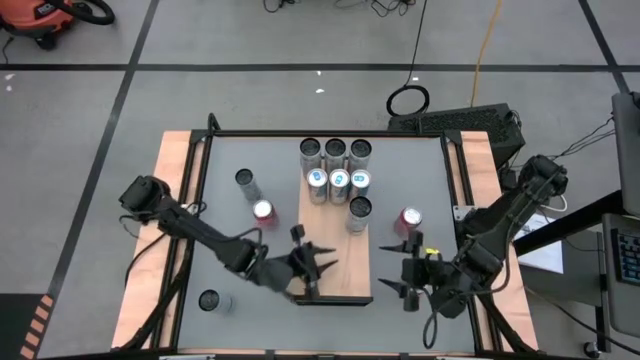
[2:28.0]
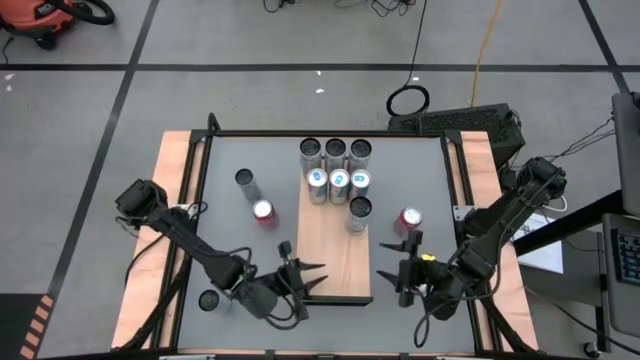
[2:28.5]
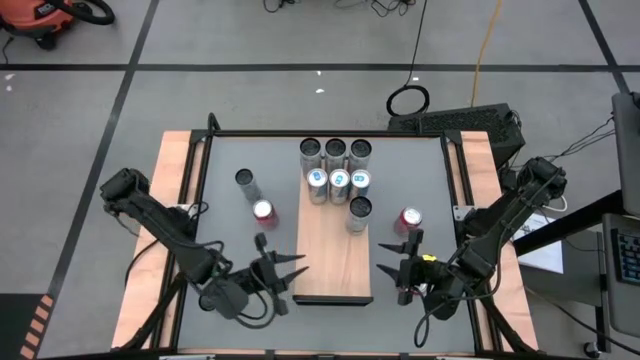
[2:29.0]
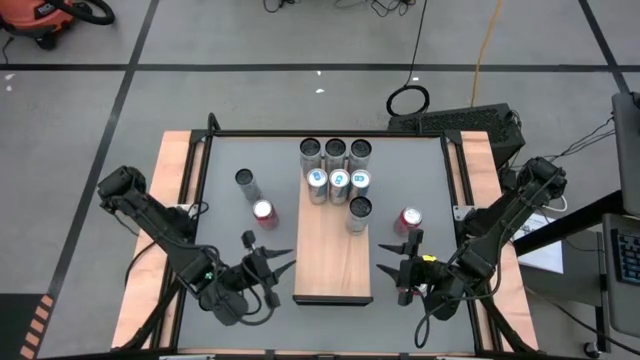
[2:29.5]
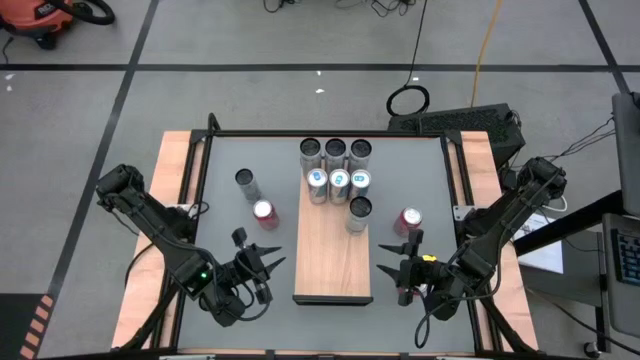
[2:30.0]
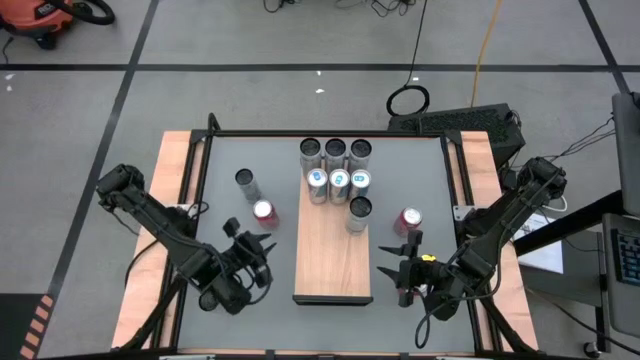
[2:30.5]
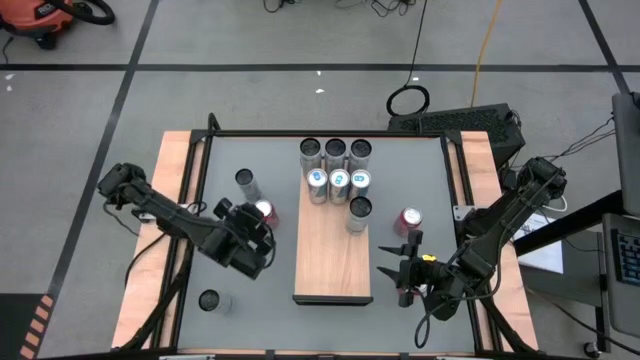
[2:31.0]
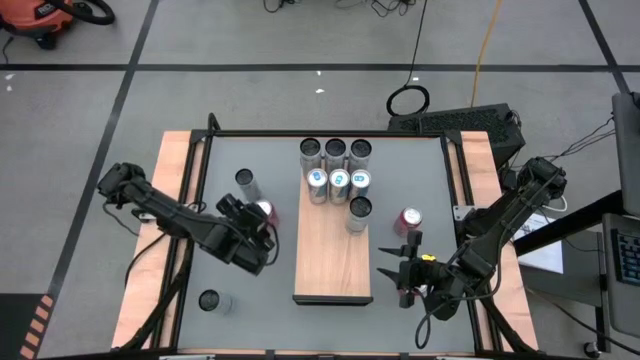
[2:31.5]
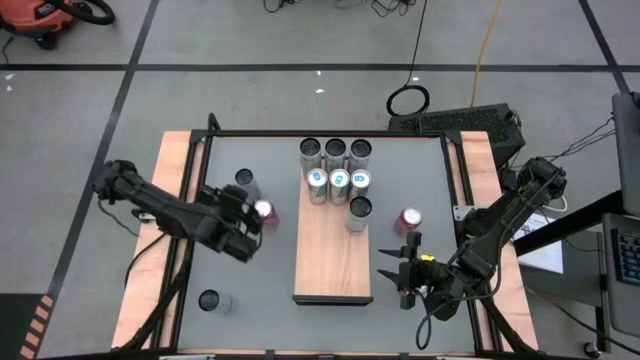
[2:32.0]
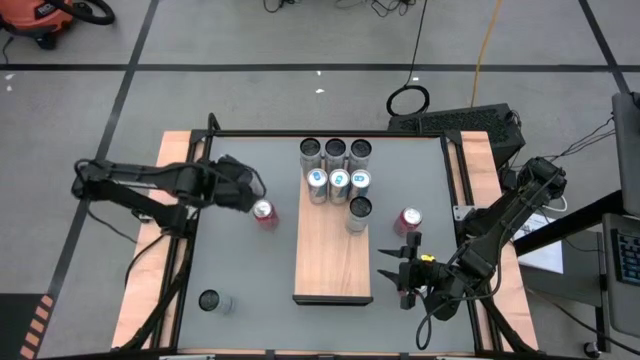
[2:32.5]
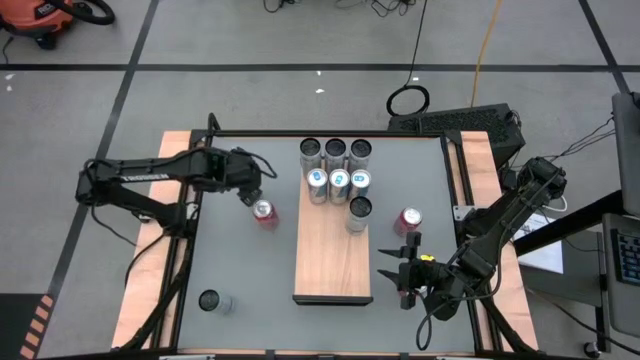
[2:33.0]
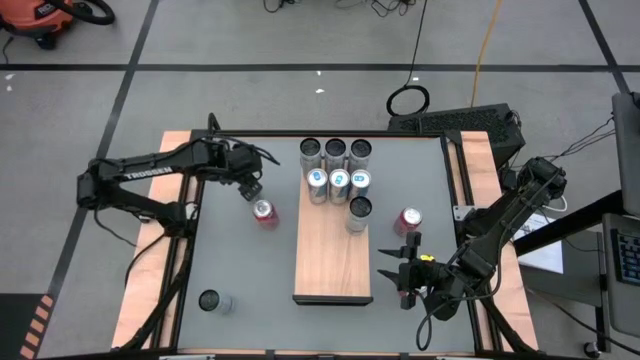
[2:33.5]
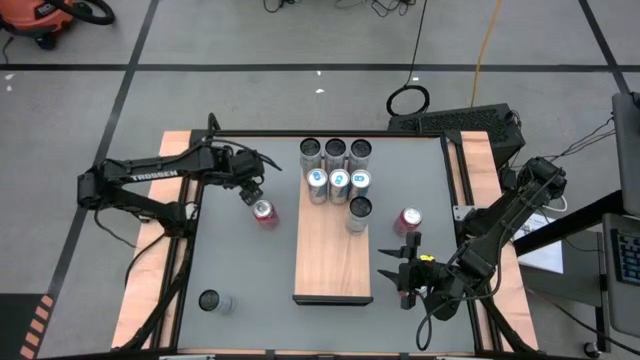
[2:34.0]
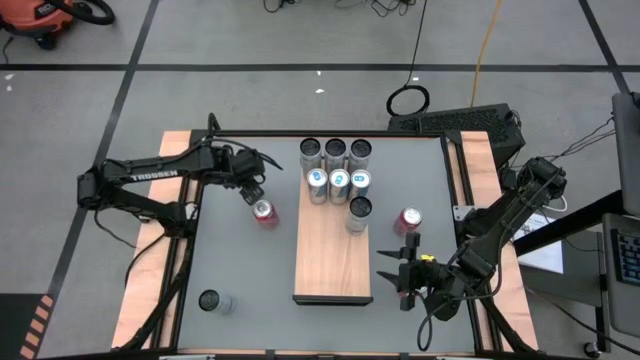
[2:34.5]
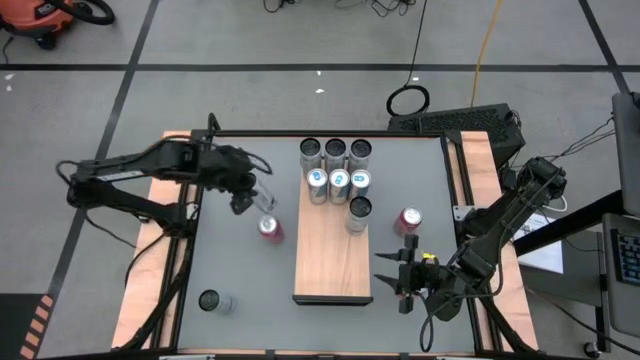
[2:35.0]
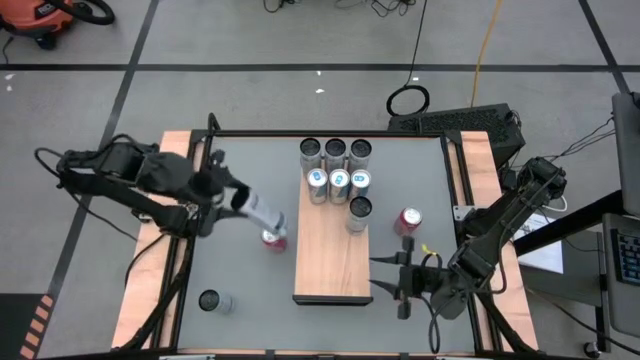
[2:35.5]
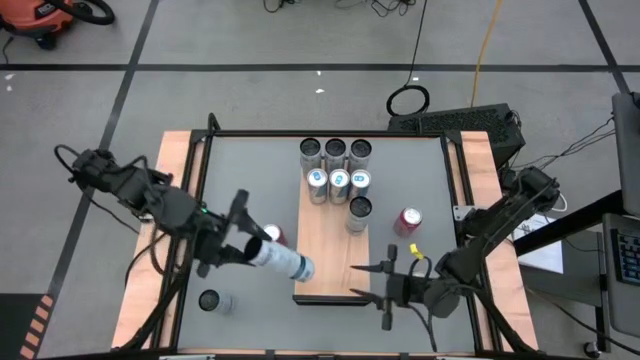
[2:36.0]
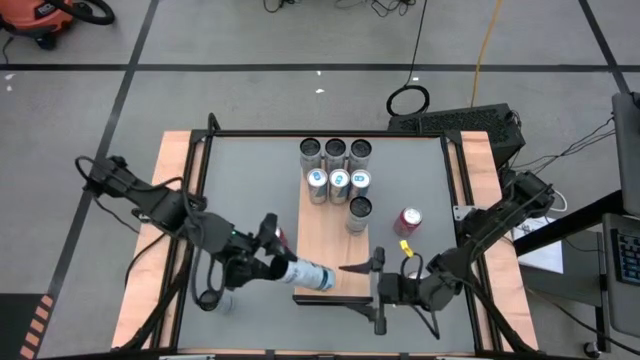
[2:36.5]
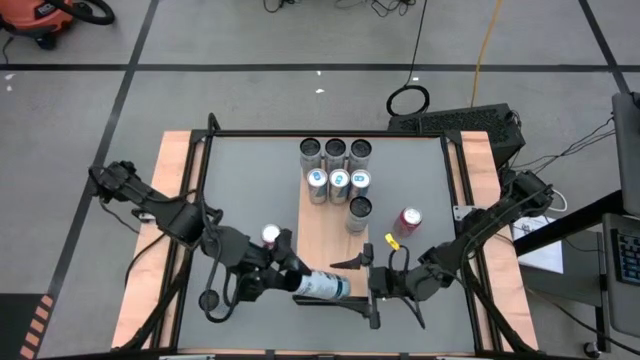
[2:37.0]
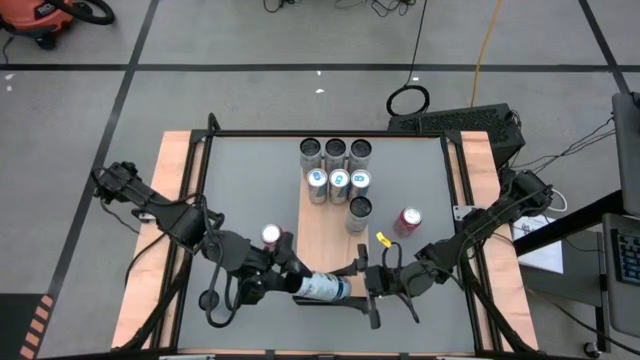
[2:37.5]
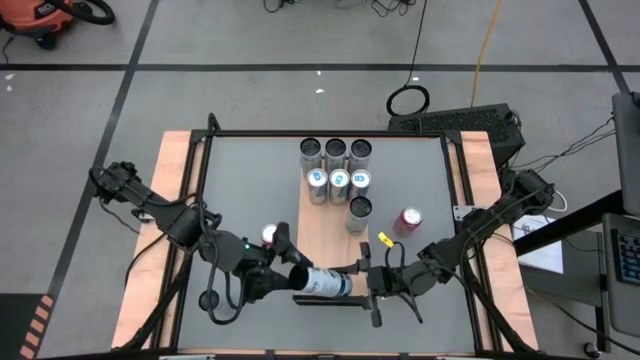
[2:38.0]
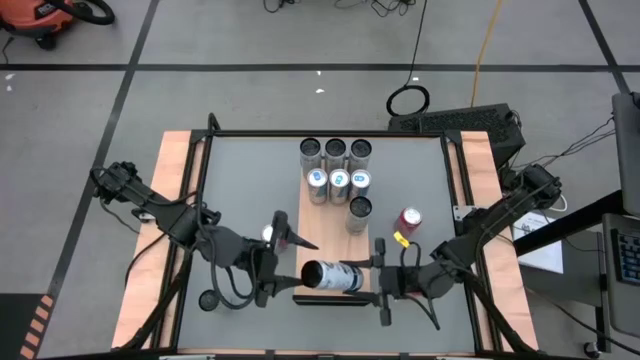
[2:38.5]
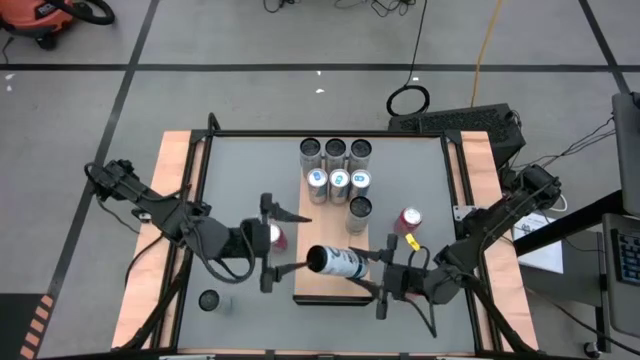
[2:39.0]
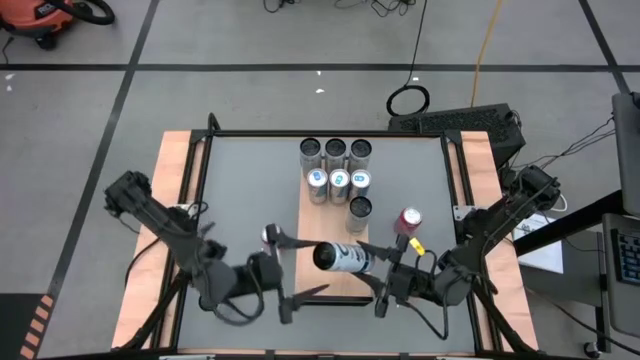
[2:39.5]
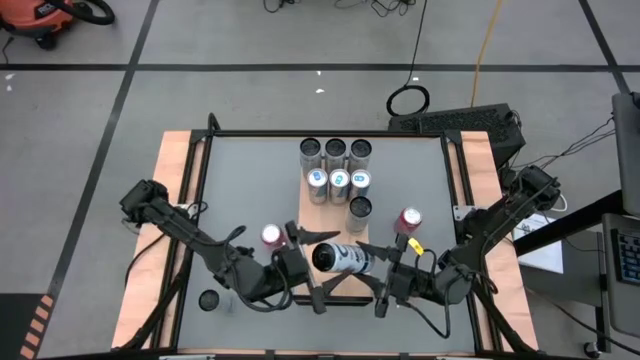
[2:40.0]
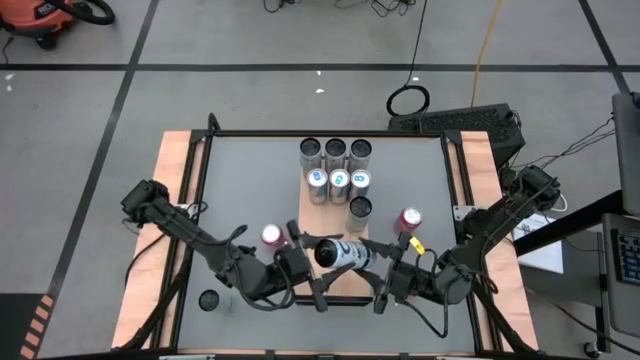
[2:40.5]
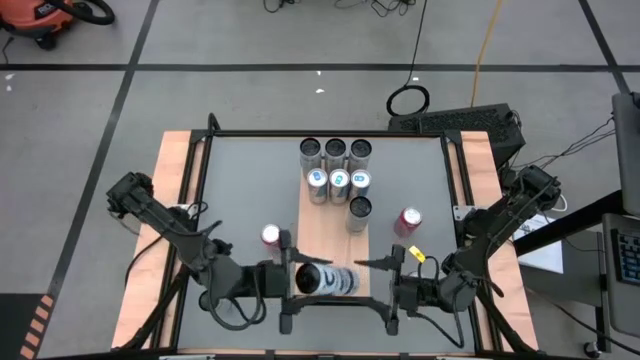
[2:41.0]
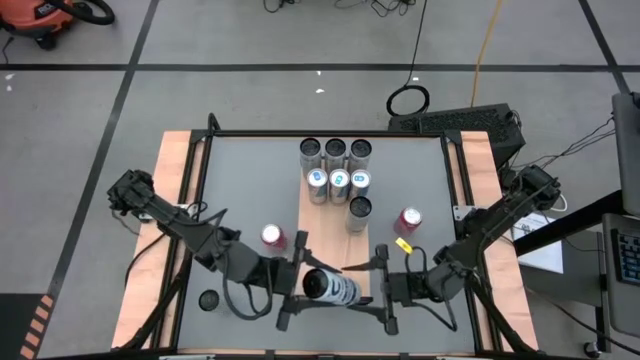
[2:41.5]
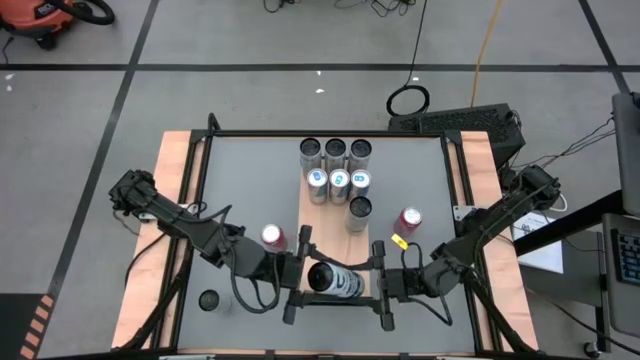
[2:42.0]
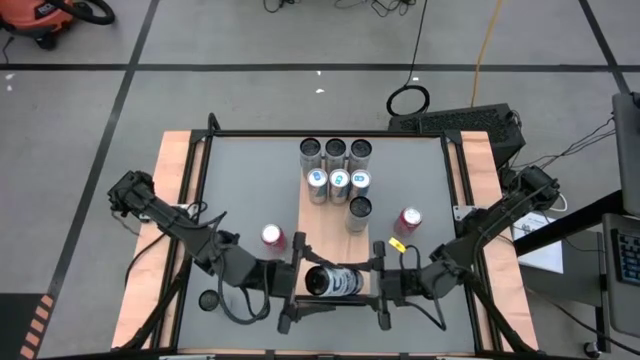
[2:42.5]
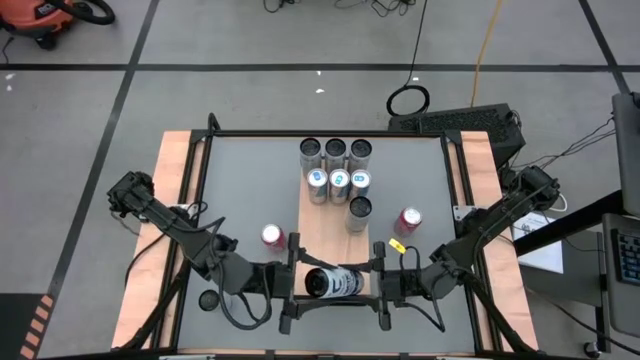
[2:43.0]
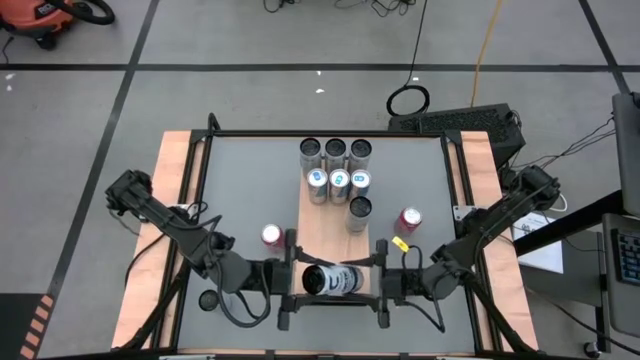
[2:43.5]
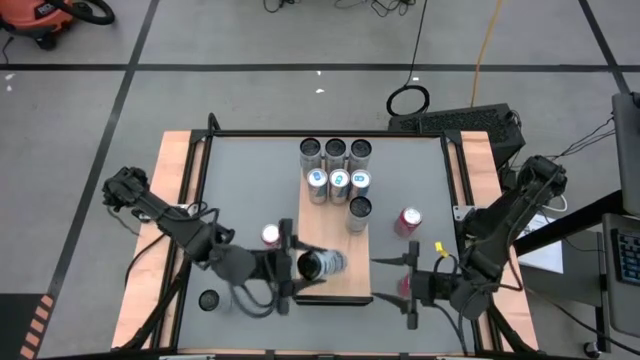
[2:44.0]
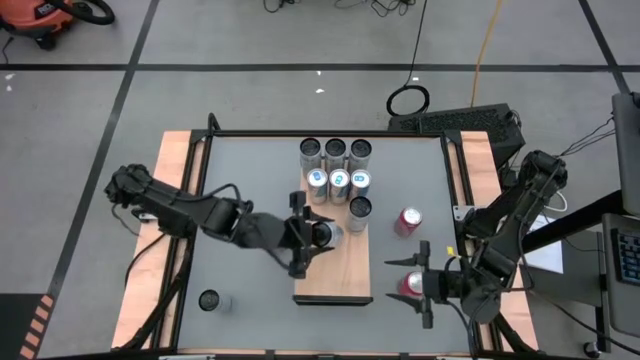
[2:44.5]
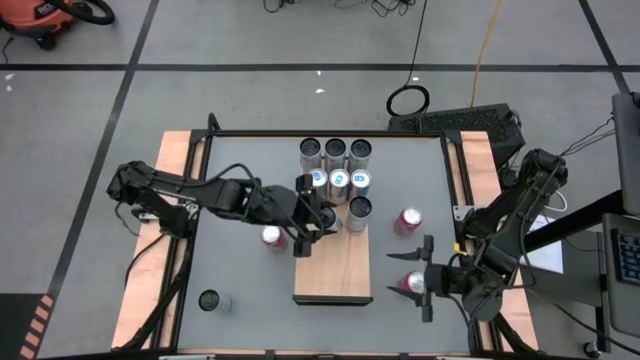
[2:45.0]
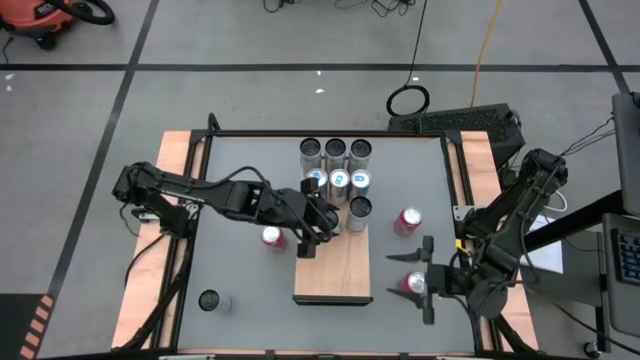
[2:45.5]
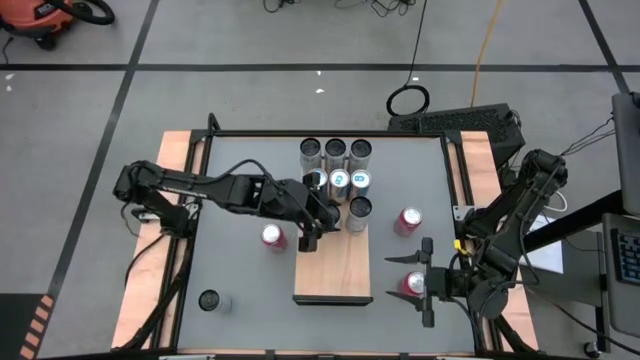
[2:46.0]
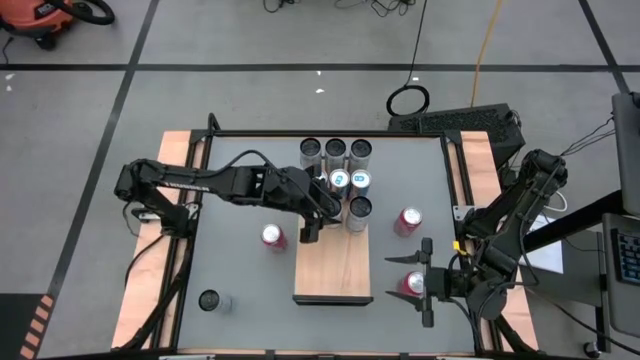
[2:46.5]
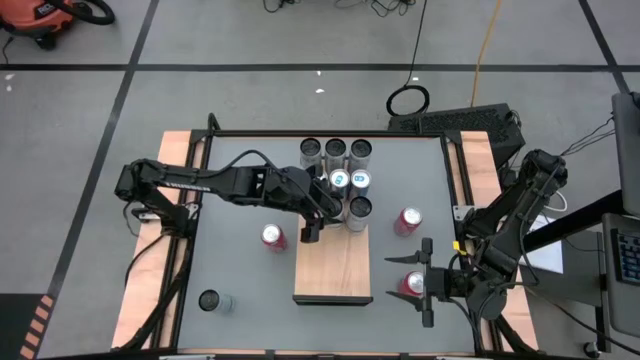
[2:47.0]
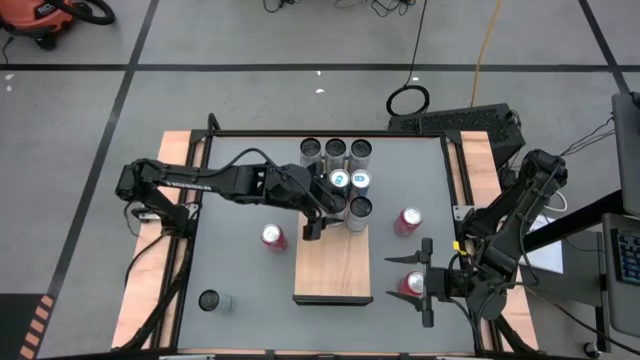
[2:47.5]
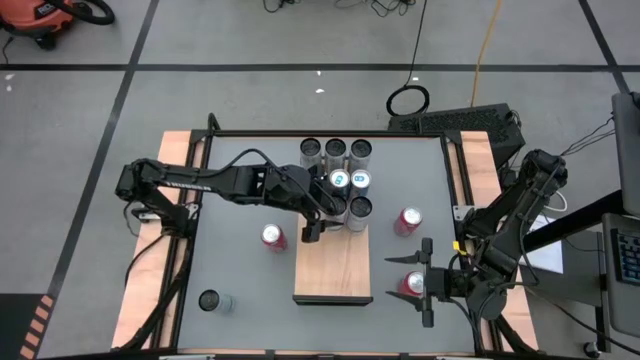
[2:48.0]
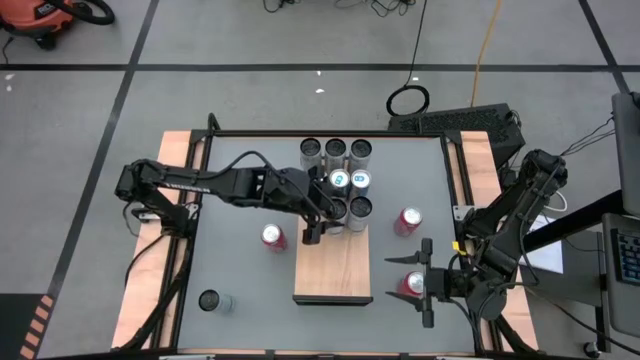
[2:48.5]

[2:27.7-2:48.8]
Task: Place canned beverage on shelf
Put the top white blue soda can on the shelf aligned with the other white blue soda can

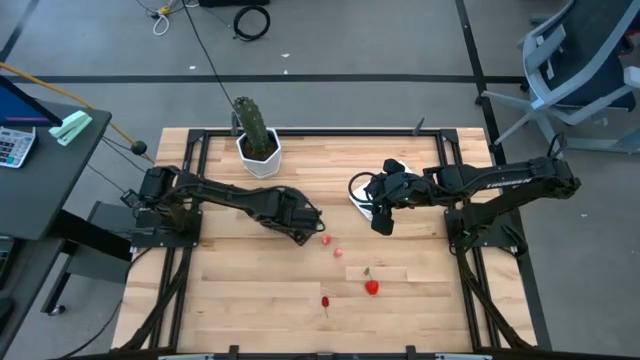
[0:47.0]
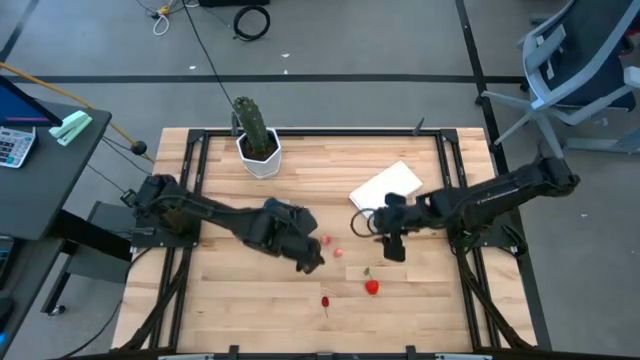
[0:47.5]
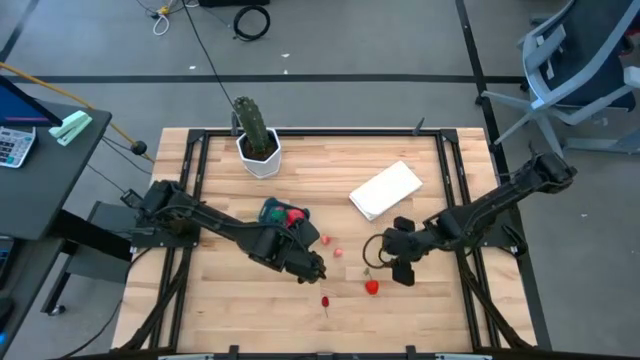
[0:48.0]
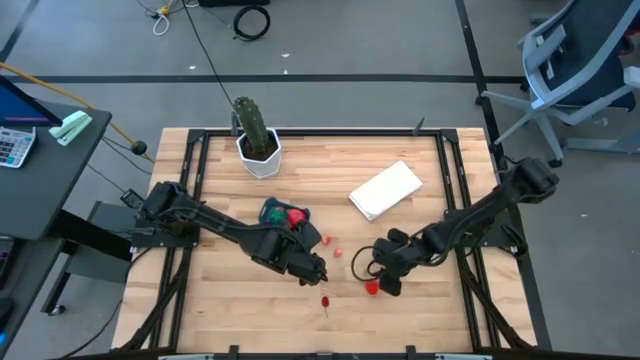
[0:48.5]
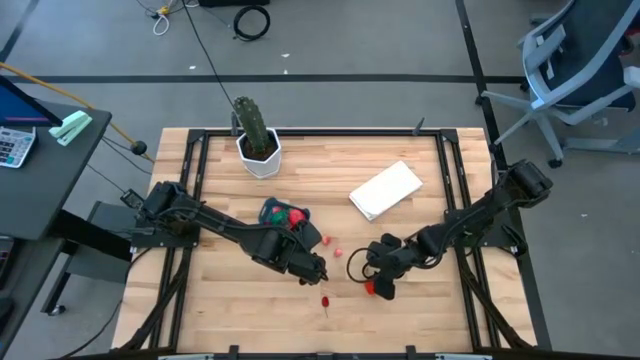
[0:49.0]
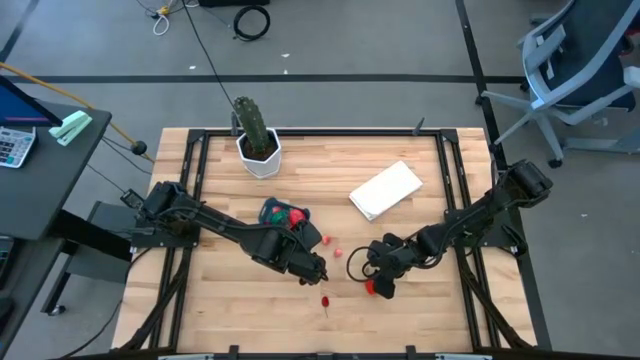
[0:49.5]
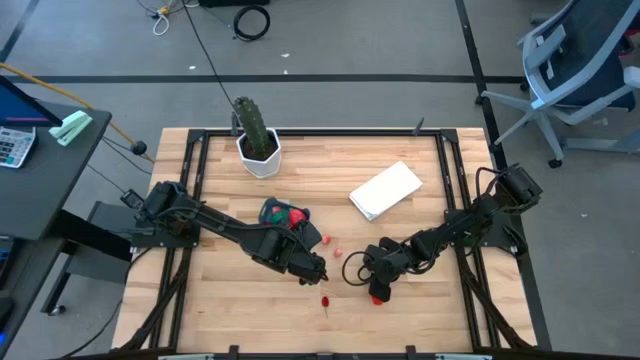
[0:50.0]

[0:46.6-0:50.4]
Task: Pick and placing Produce into tupperware
Put the red strawberry into the blue bin
